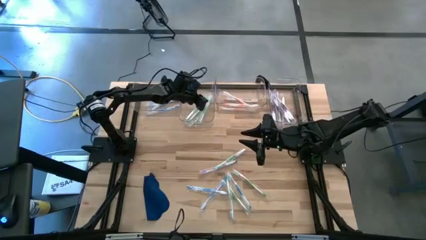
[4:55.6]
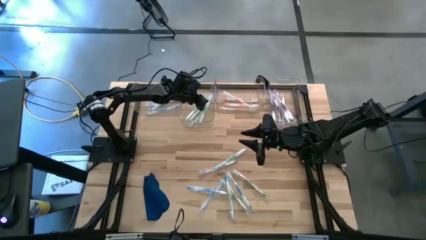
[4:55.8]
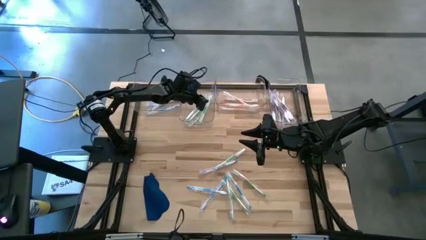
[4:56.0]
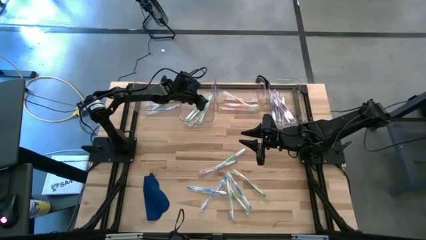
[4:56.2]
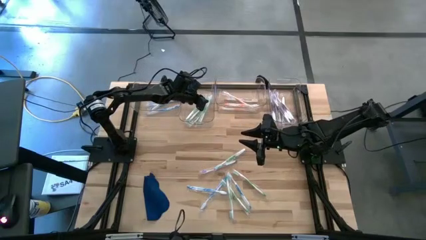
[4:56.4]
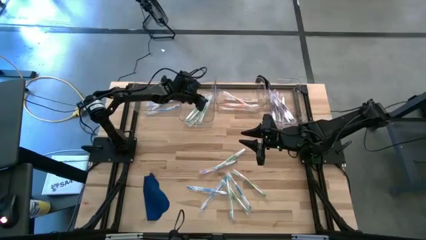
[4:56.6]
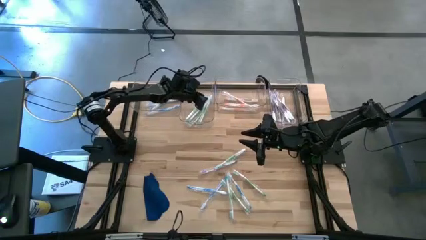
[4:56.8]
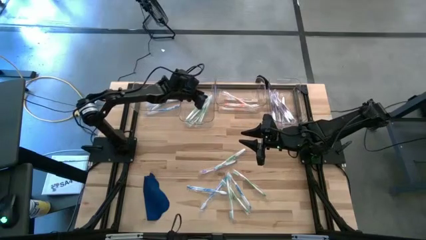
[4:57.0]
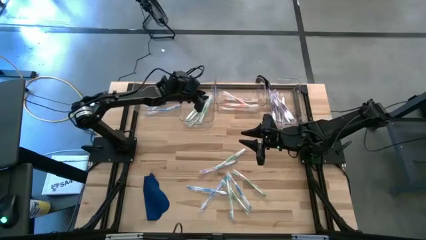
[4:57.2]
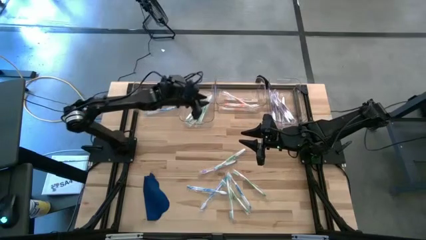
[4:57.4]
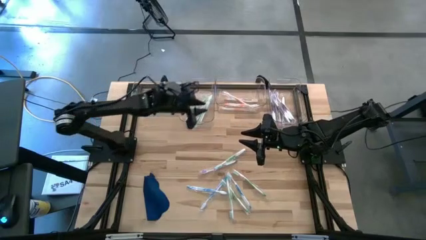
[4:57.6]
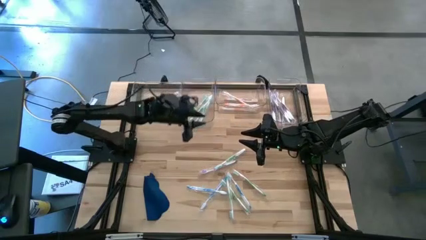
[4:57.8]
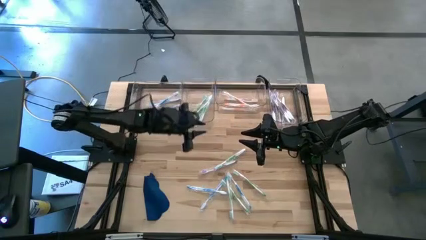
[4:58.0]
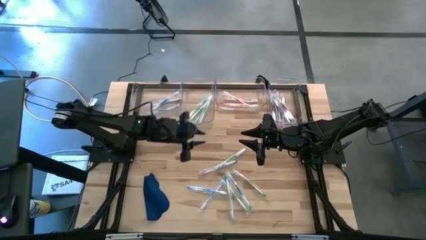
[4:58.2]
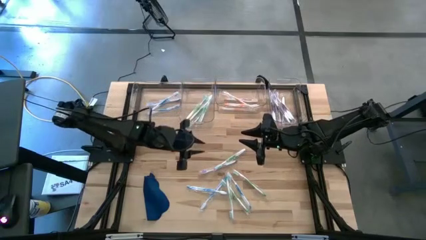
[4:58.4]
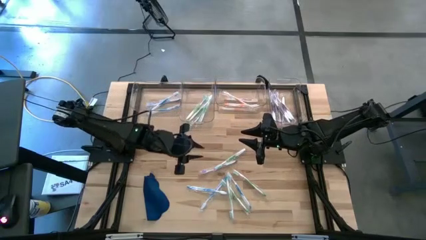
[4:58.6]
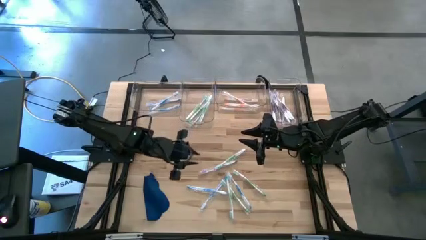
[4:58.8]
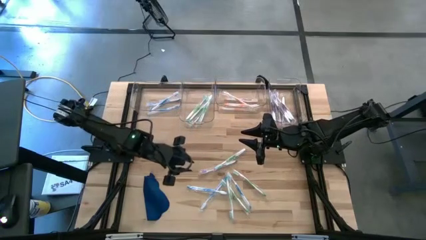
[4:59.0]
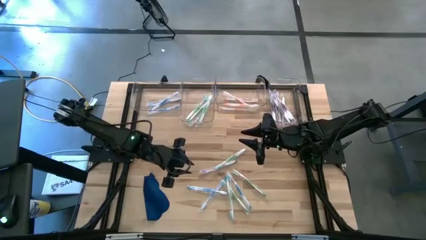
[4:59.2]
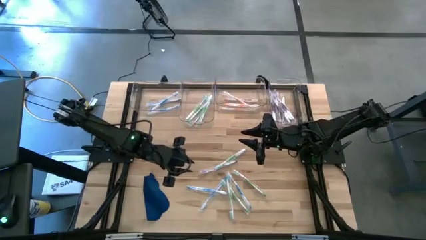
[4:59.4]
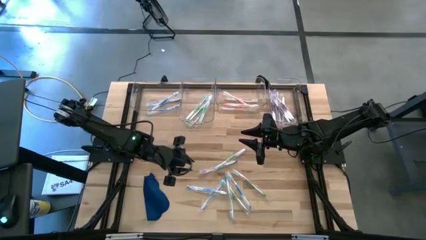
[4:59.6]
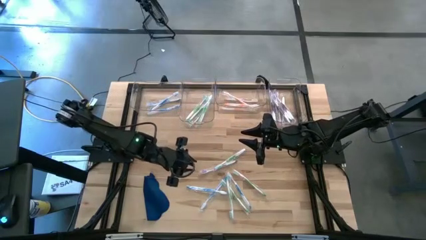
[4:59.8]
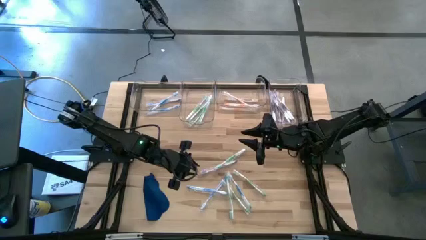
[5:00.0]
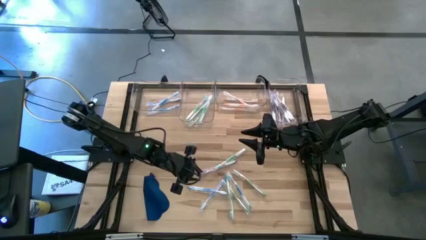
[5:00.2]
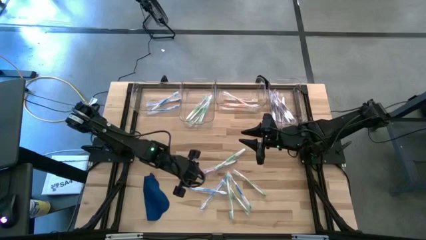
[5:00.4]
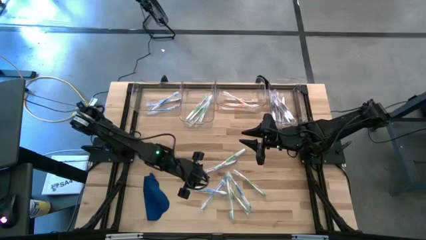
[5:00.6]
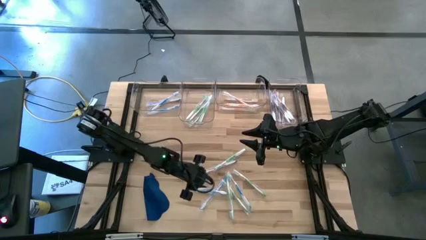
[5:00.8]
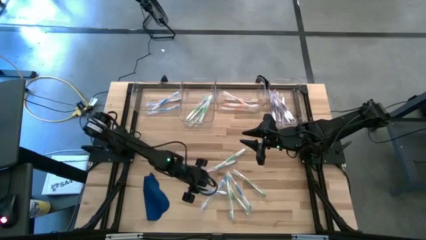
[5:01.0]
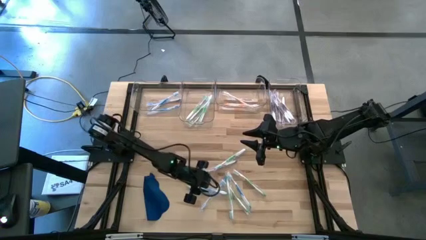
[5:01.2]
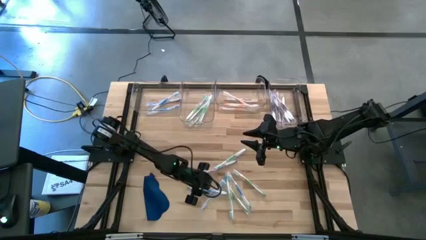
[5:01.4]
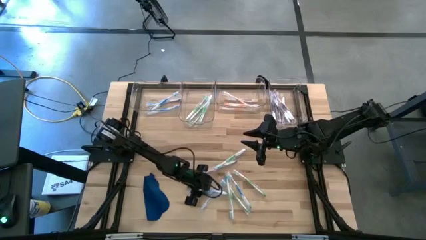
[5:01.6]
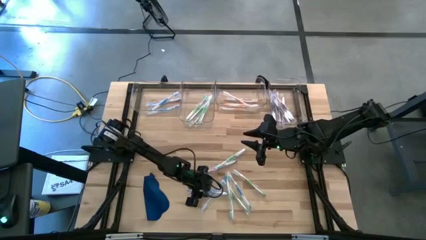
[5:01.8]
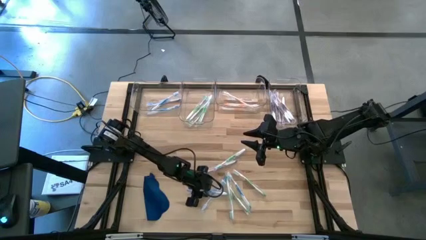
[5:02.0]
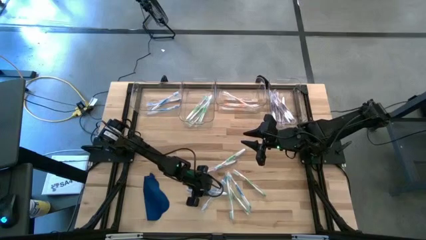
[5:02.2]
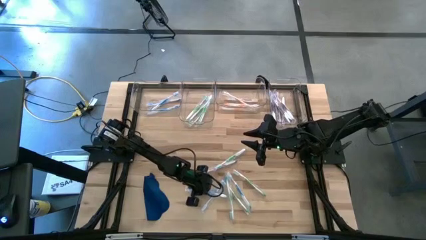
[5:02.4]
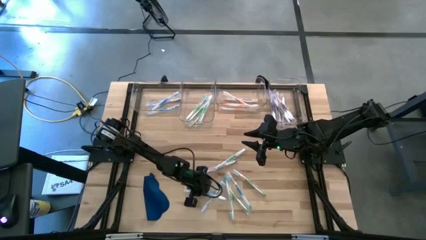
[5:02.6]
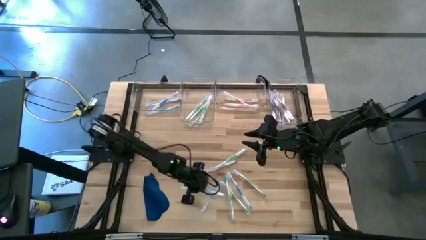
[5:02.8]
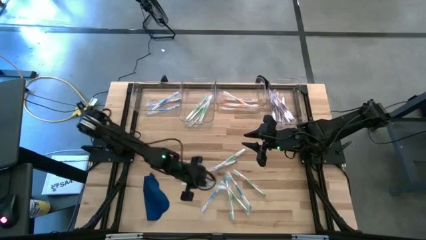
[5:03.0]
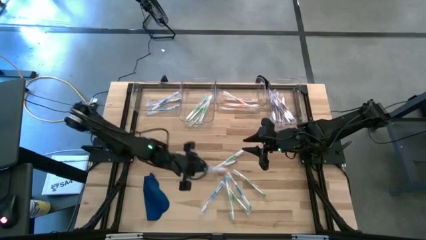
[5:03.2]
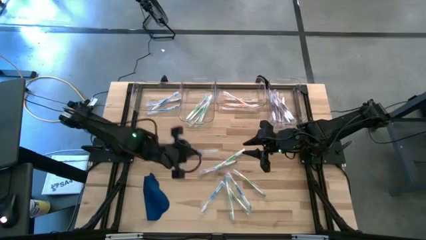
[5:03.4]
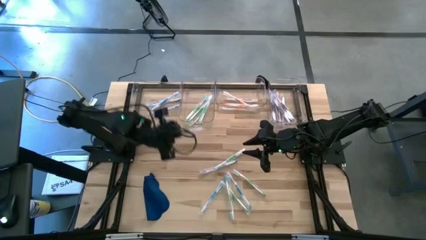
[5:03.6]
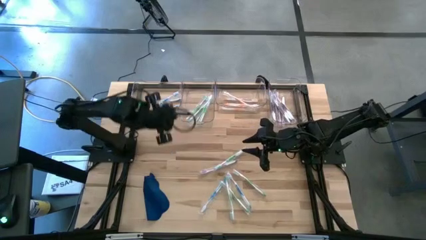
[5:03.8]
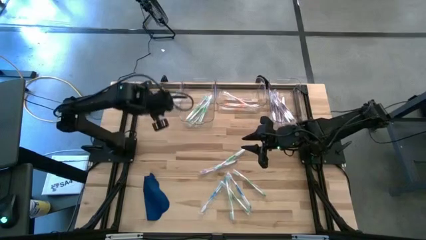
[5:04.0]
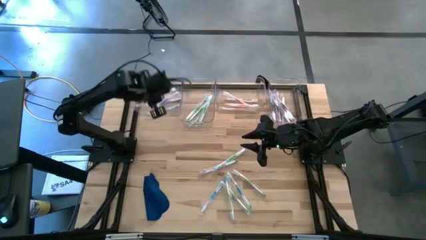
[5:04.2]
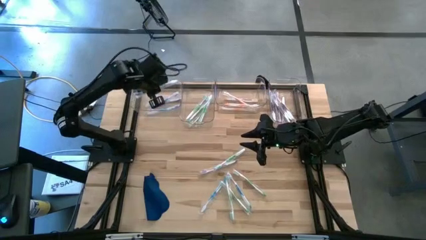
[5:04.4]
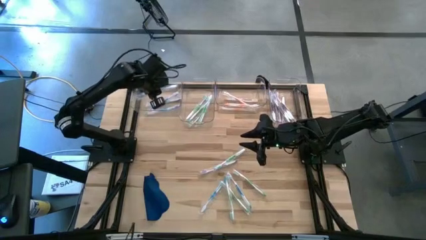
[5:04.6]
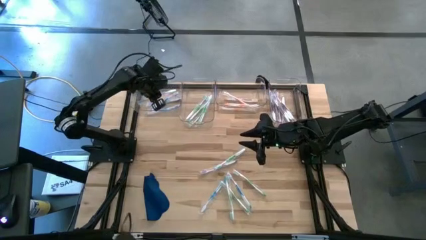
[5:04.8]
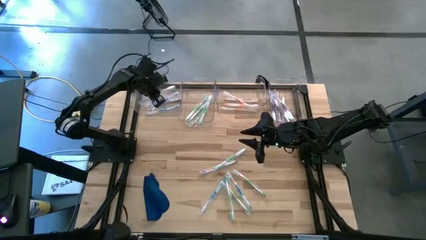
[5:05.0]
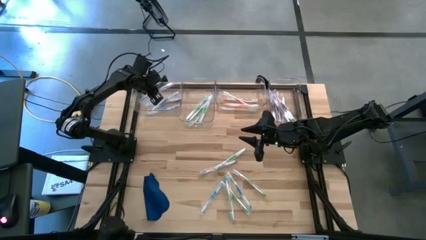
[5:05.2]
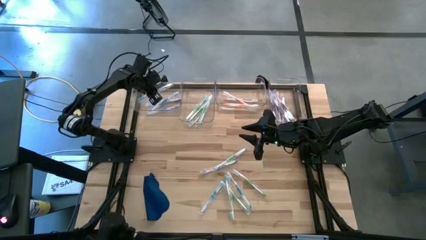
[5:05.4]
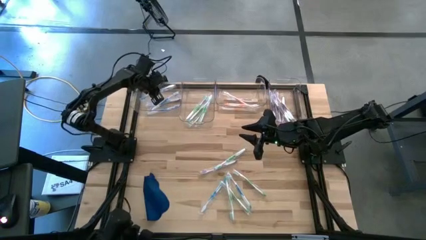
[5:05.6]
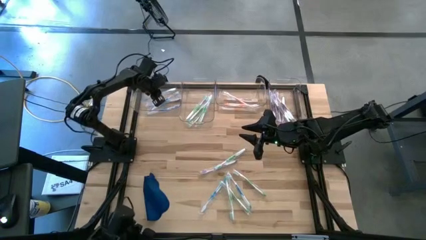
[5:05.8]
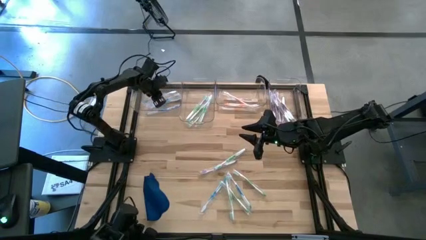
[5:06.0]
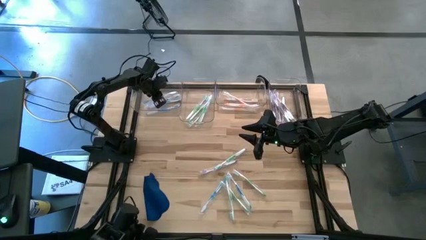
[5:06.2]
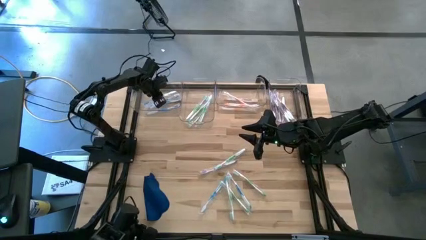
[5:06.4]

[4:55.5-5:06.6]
Task: Pick & Place Toothbrushes
Put the blue toothbrush into the left transparent bin

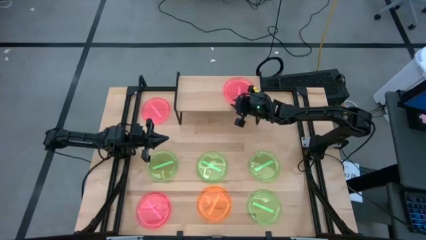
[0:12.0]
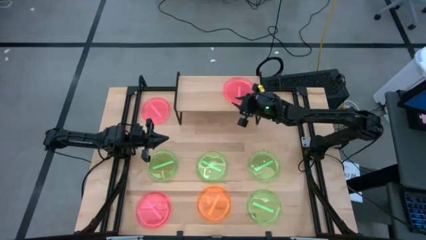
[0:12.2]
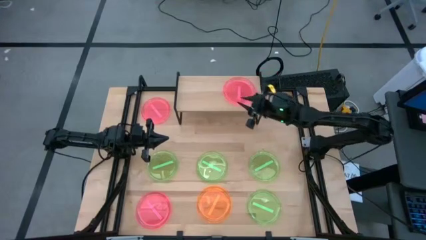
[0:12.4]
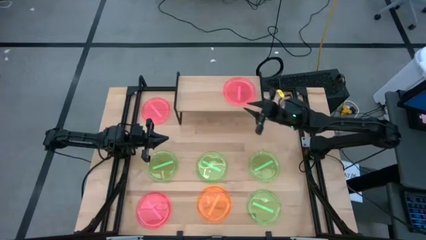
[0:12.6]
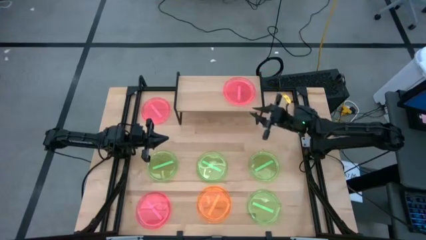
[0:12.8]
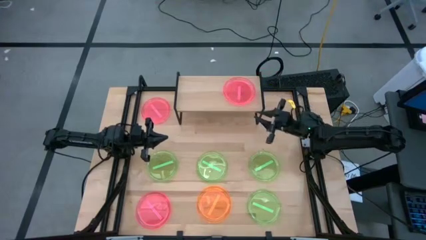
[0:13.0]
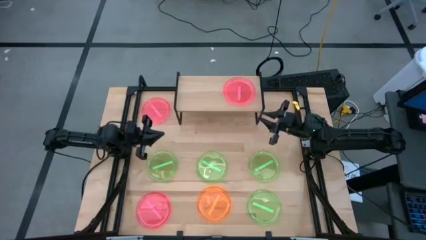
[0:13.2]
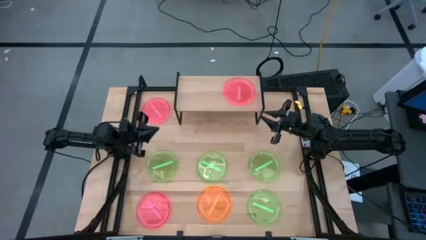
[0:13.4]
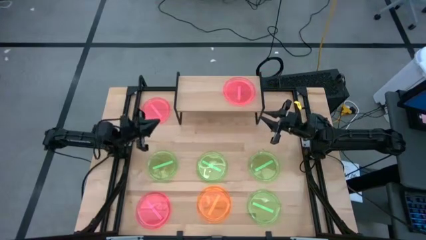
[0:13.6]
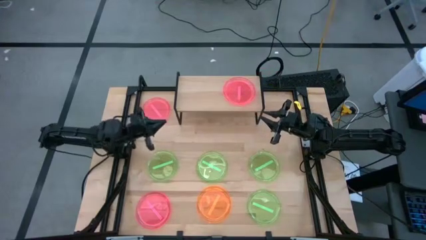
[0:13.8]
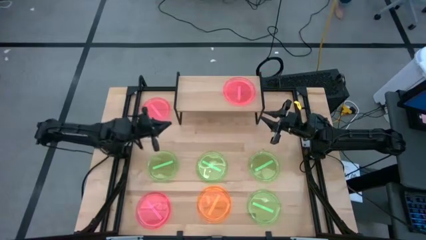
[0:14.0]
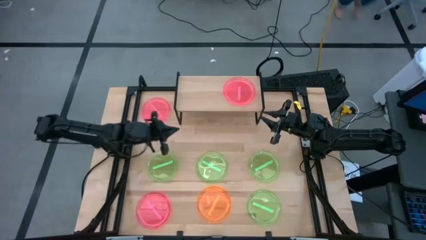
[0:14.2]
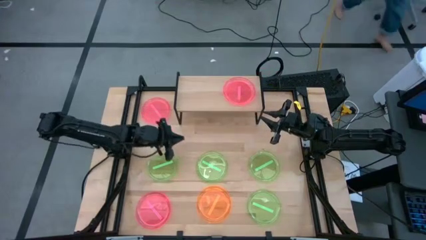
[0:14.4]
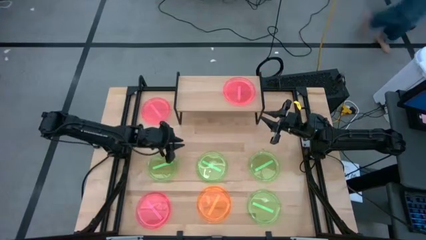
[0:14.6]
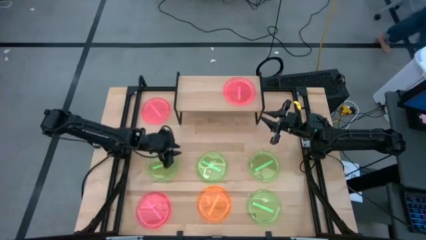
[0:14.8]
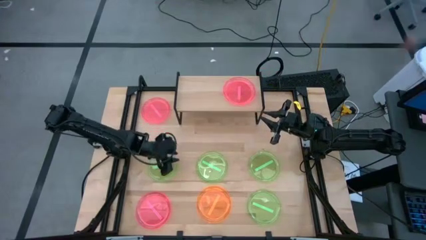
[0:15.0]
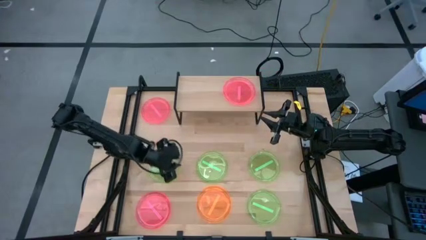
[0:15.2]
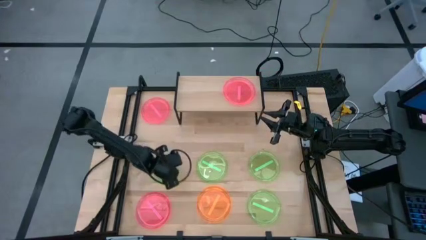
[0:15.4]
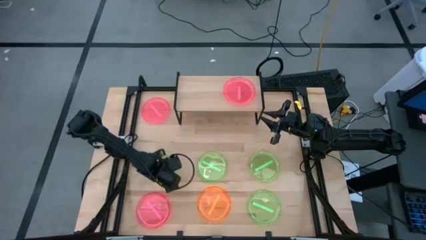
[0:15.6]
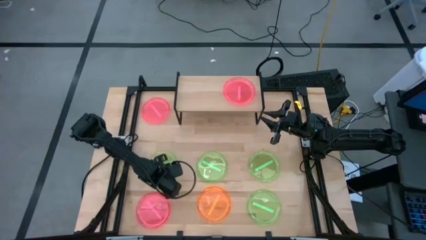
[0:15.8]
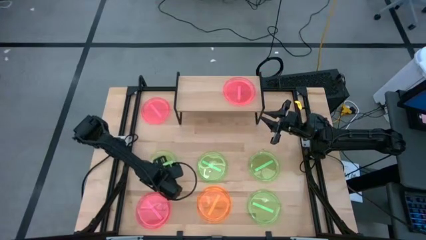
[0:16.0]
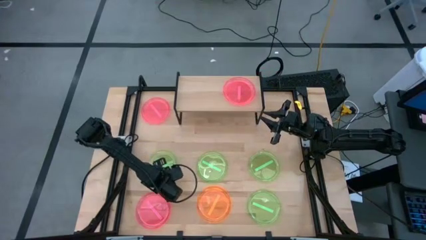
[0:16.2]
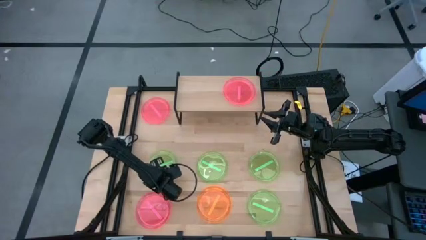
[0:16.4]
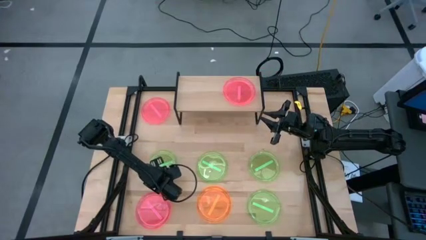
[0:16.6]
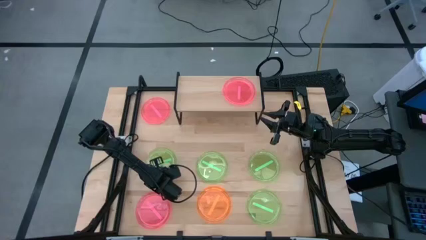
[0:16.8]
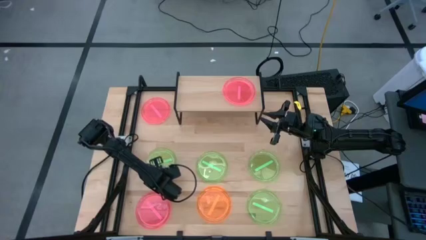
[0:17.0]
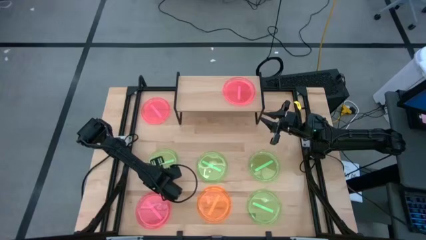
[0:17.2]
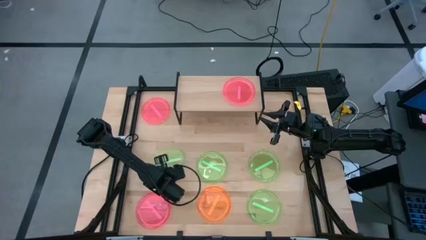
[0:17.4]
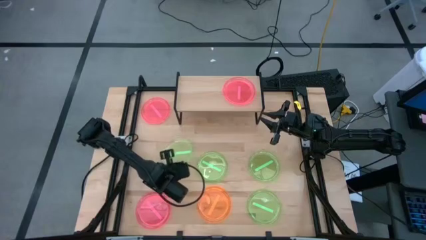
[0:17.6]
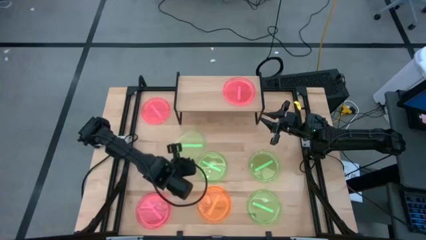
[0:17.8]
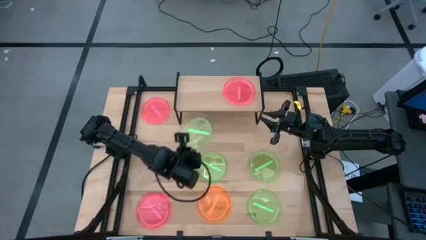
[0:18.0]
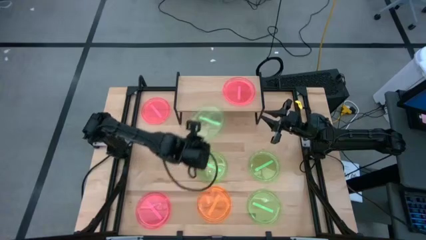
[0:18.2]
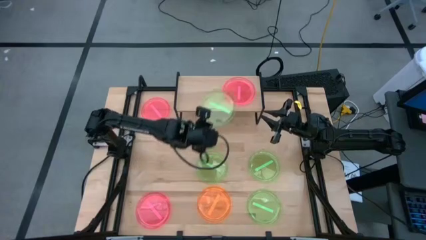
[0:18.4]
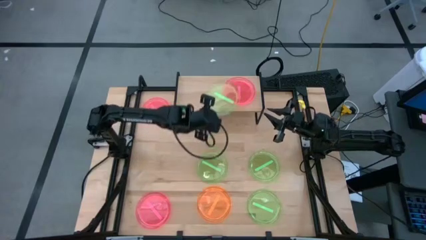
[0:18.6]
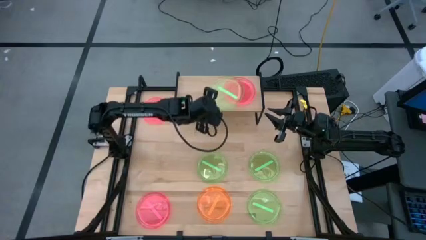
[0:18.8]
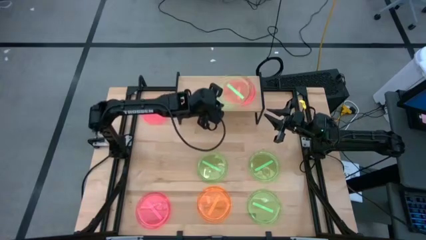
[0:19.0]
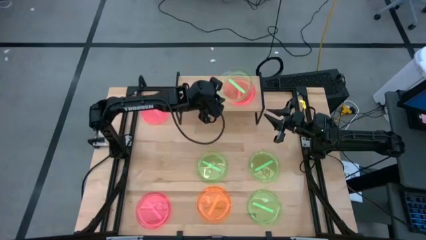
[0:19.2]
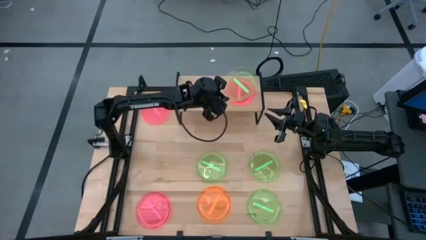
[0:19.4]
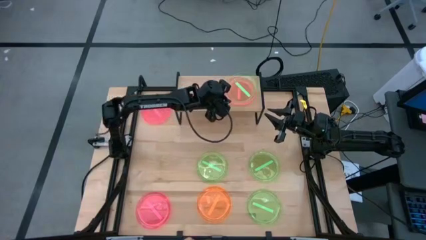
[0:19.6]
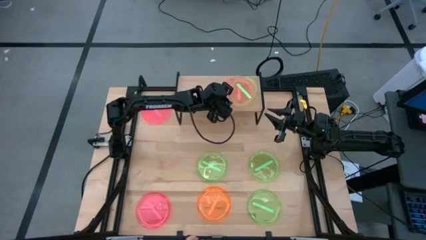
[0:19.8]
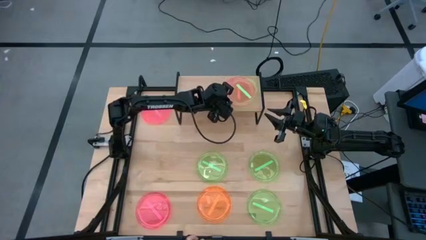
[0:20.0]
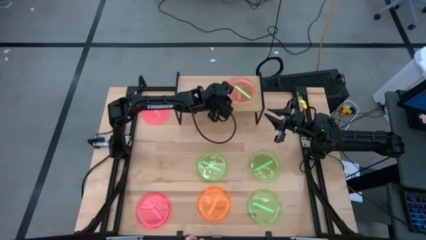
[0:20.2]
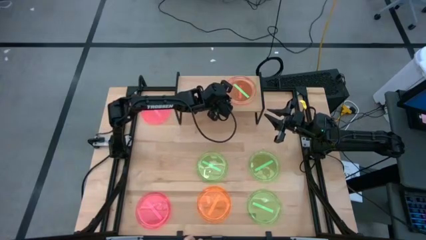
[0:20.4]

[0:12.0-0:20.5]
Task: Place and stack plates onto a shelf
Stack the top left green plate on top of the red plate on the shelf
